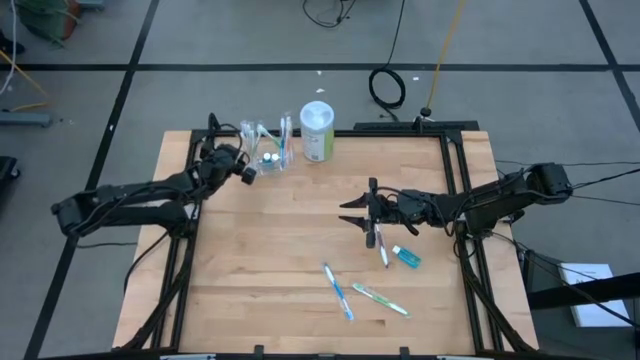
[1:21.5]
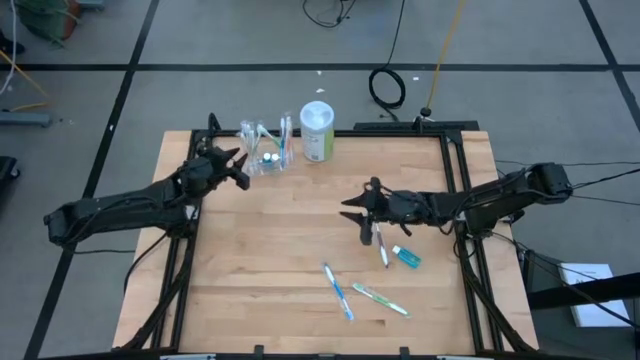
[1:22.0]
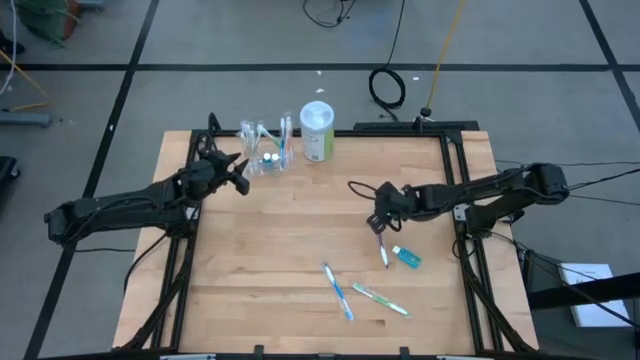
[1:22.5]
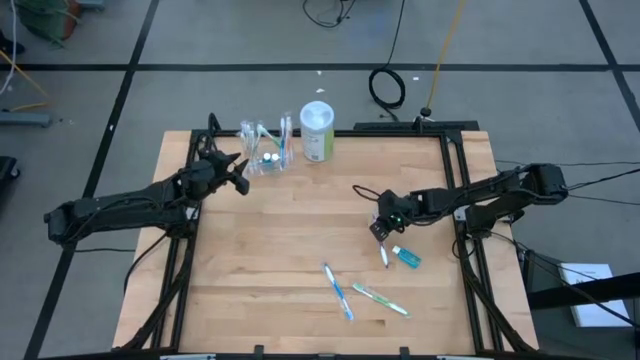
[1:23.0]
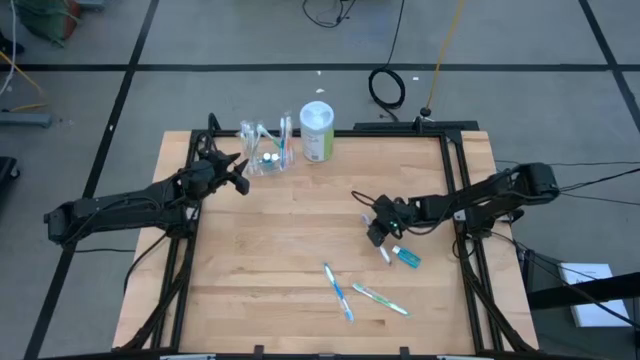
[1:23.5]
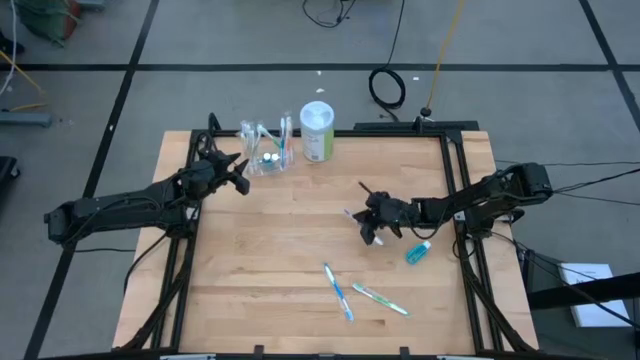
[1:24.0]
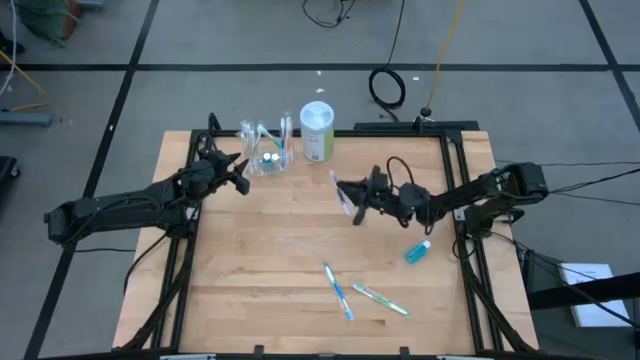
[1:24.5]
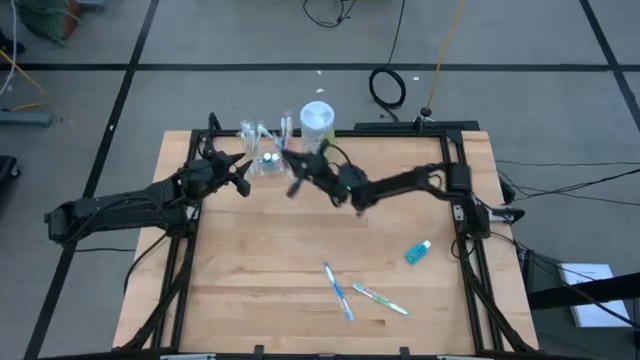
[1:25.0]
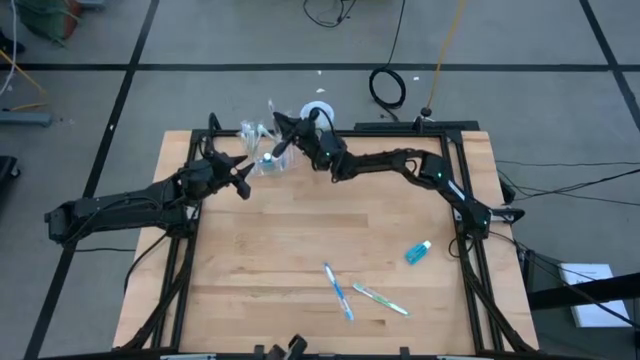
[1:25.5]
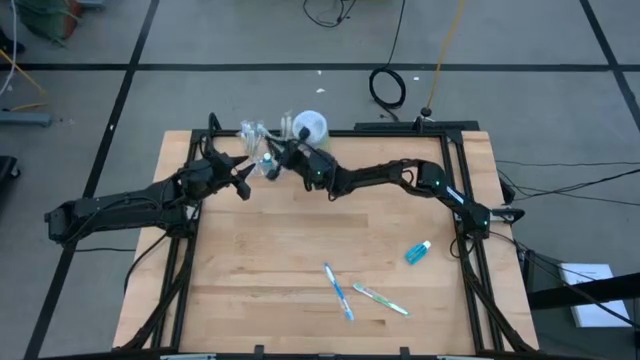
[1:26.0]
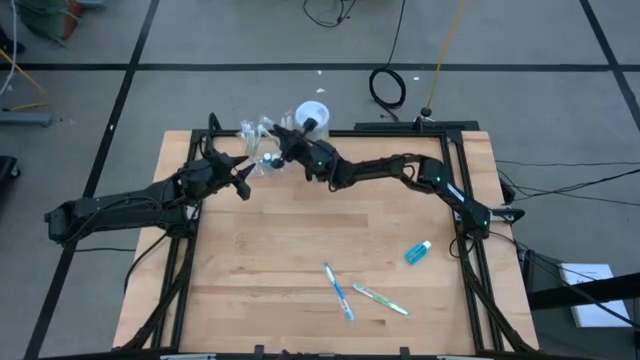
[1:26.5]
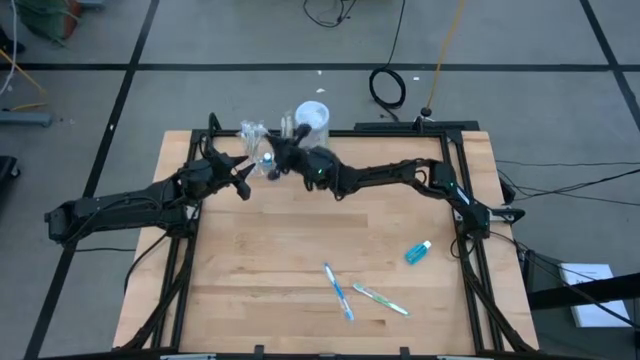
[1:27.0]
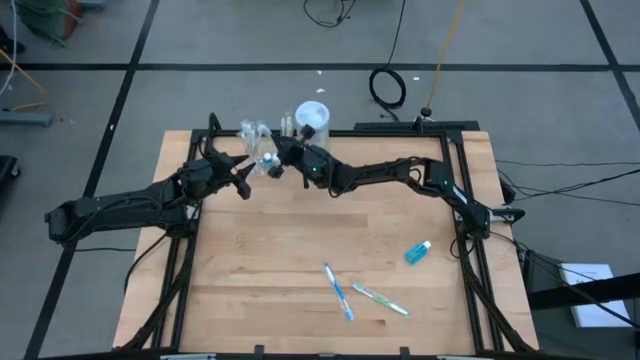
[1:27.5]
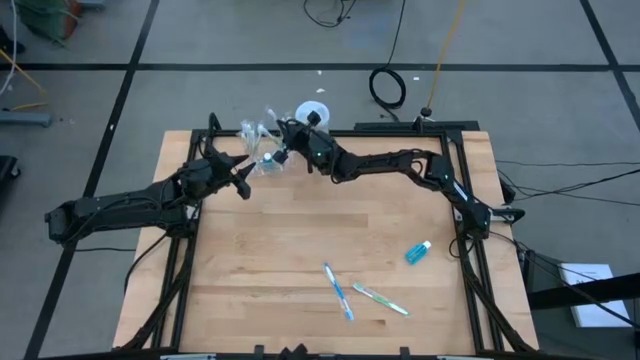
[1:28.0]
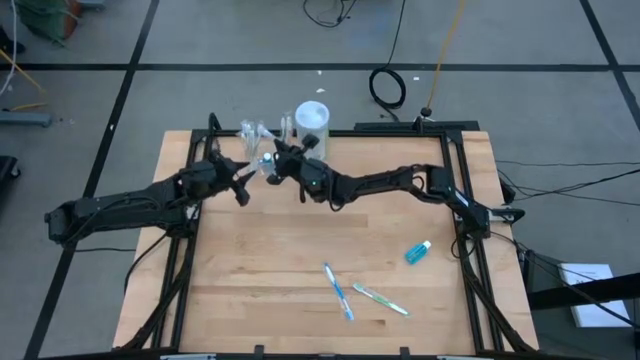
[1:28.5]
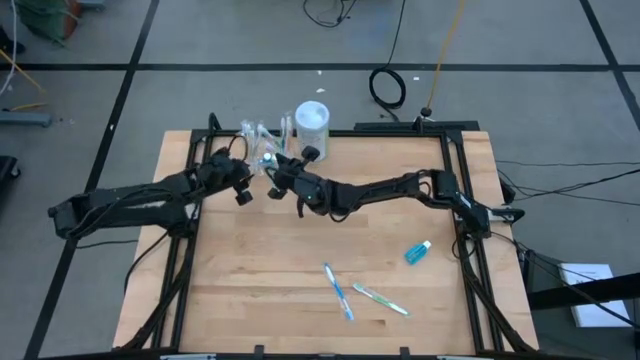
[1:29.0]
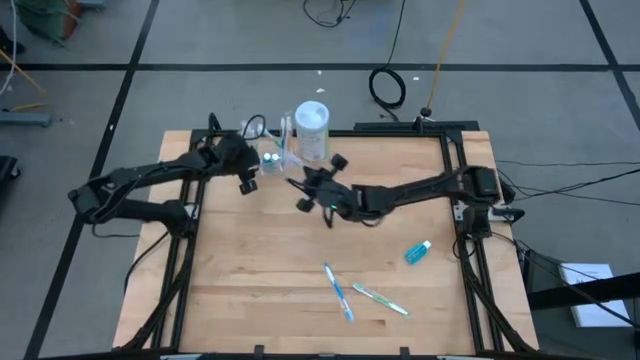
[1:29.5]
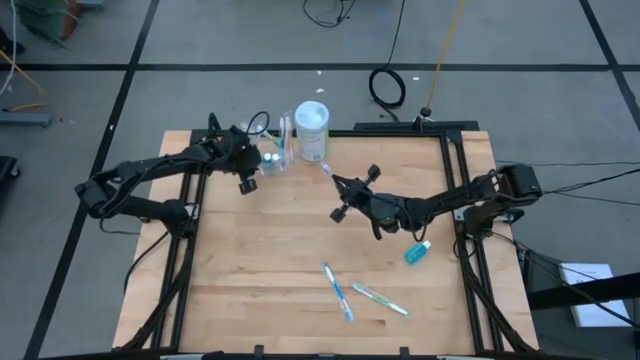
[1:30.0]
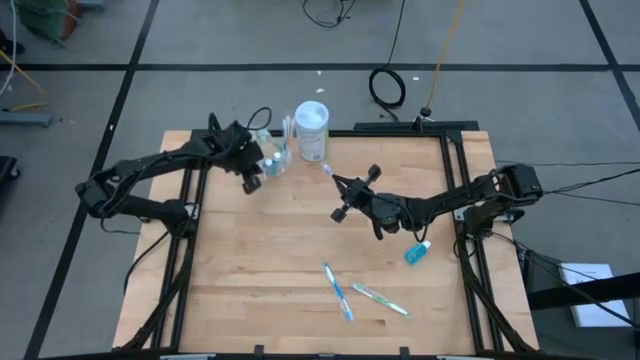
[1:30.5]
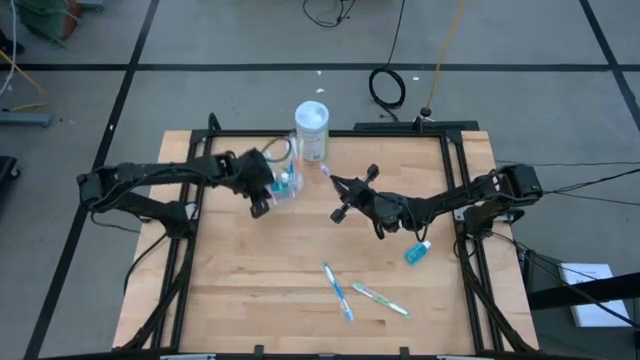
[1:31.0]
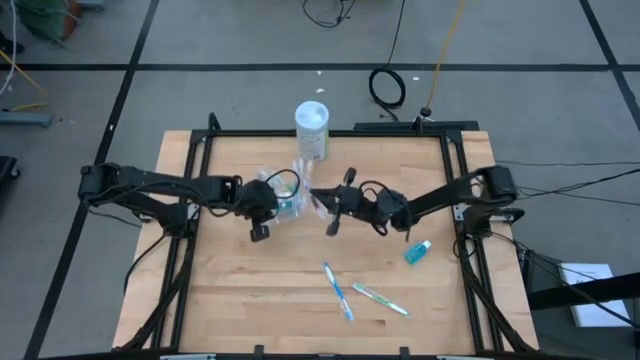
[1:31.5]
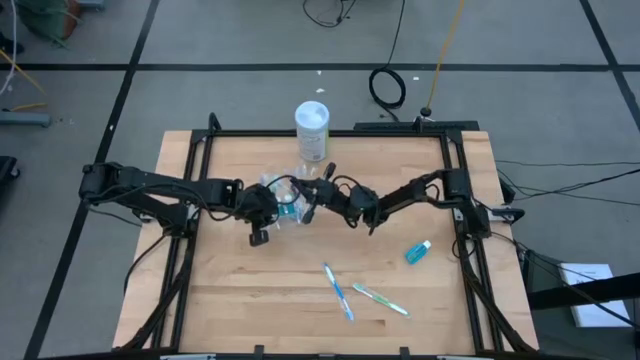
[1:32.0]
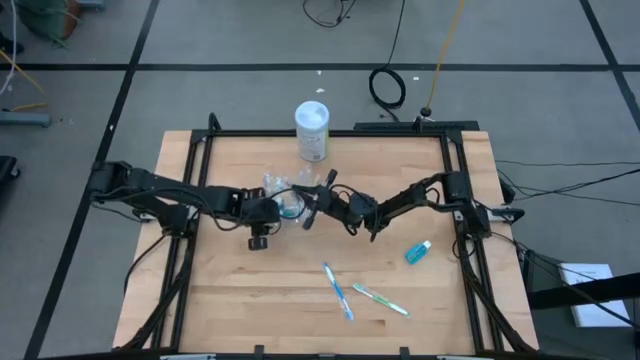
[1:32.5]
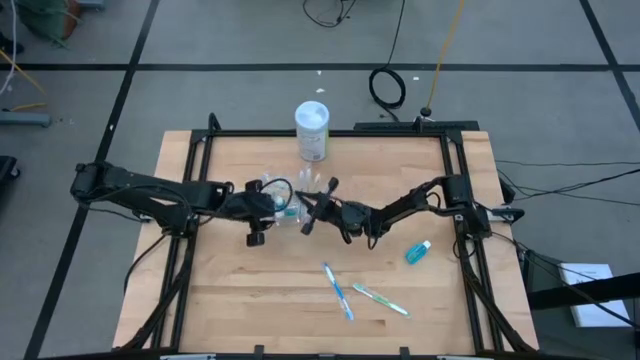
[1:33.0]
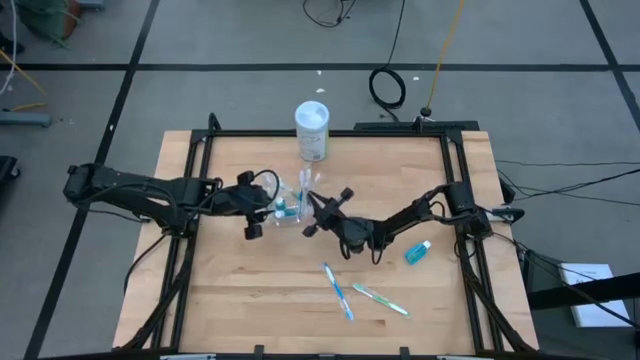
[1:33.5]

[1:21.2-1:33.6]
Task: Pick & Place toothbrushing station
Put the violet toothbrush into the transparent organizer

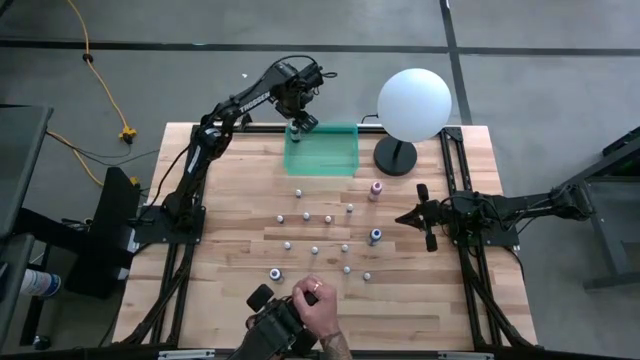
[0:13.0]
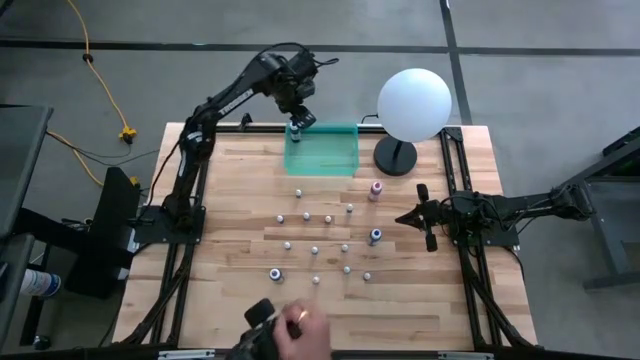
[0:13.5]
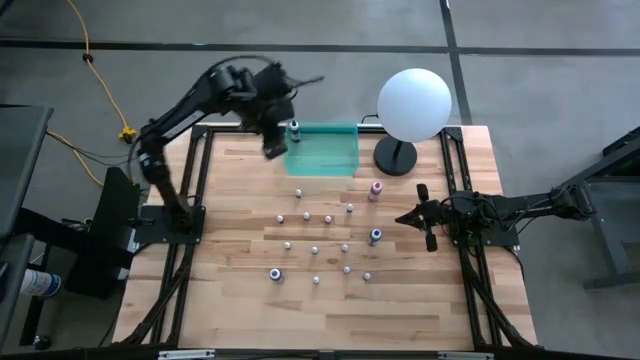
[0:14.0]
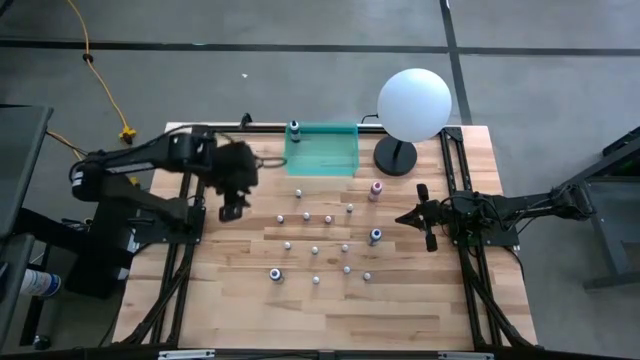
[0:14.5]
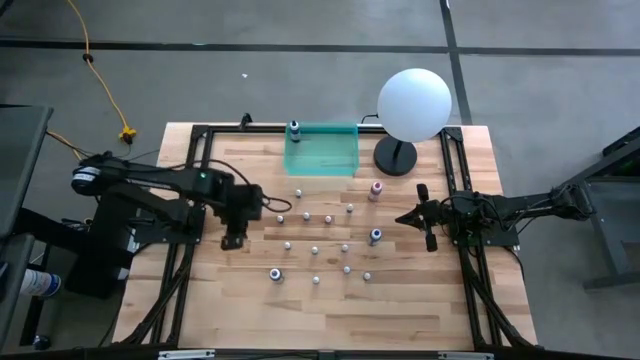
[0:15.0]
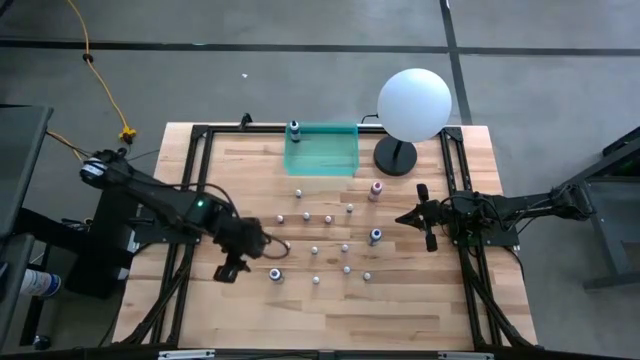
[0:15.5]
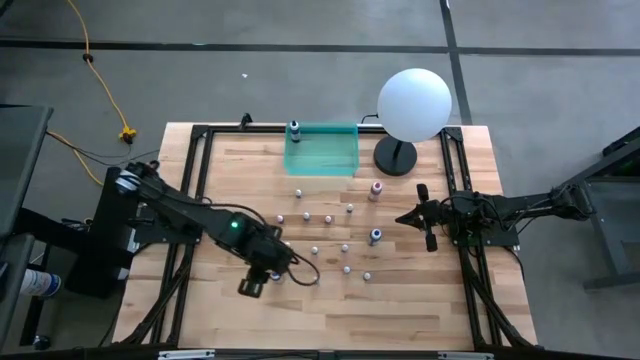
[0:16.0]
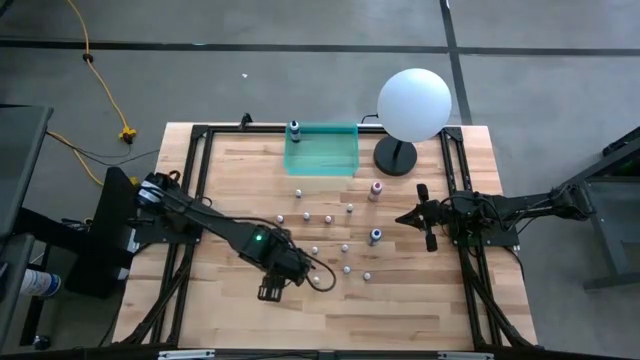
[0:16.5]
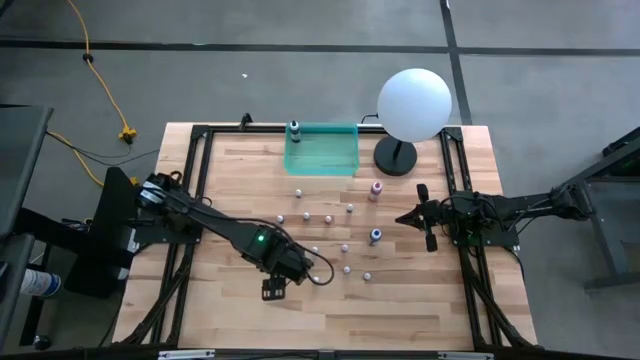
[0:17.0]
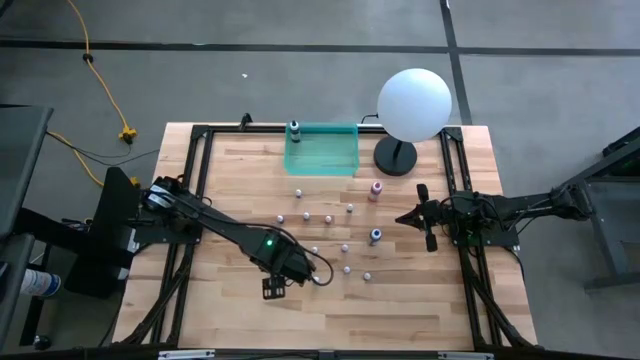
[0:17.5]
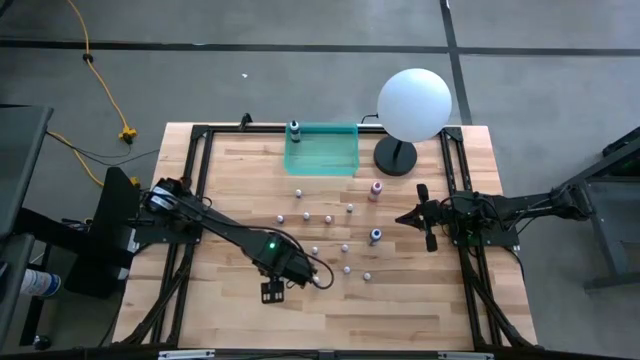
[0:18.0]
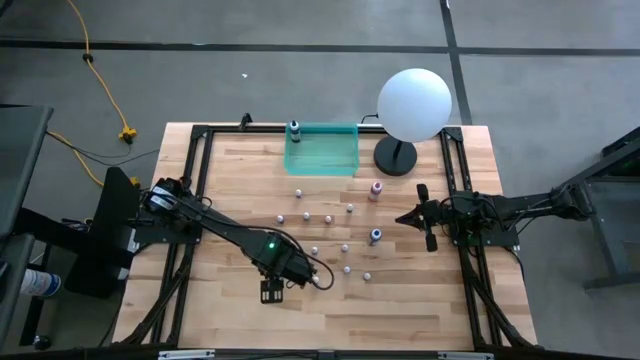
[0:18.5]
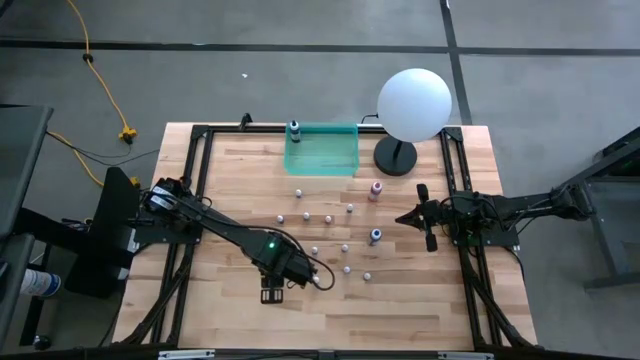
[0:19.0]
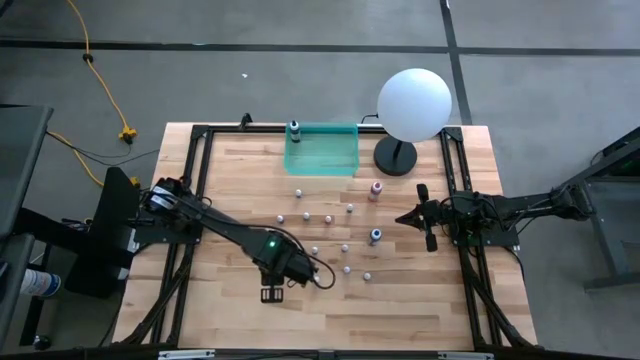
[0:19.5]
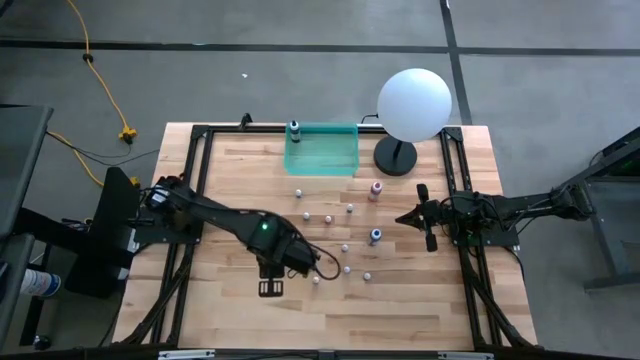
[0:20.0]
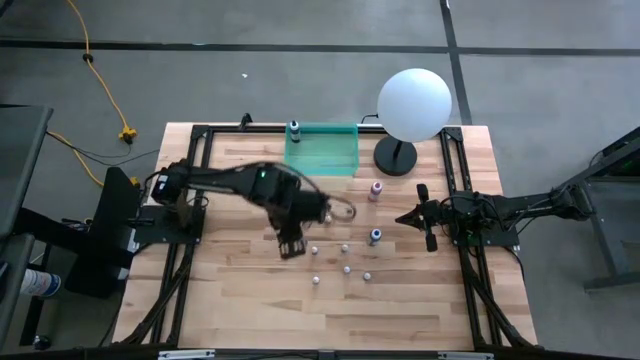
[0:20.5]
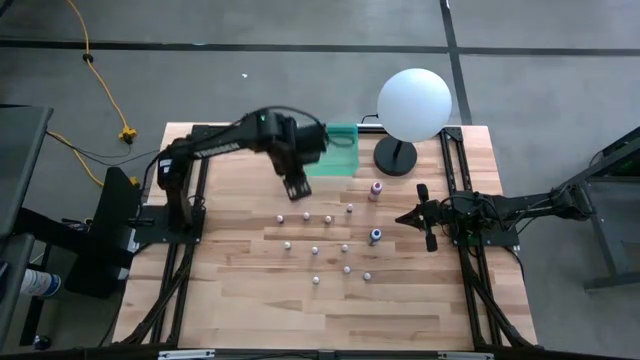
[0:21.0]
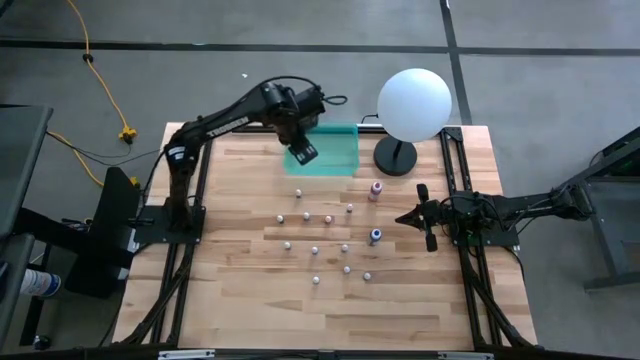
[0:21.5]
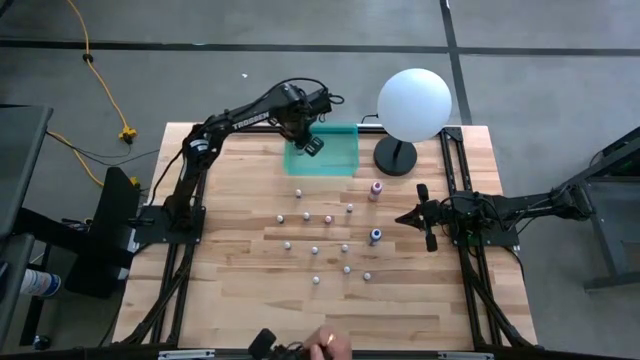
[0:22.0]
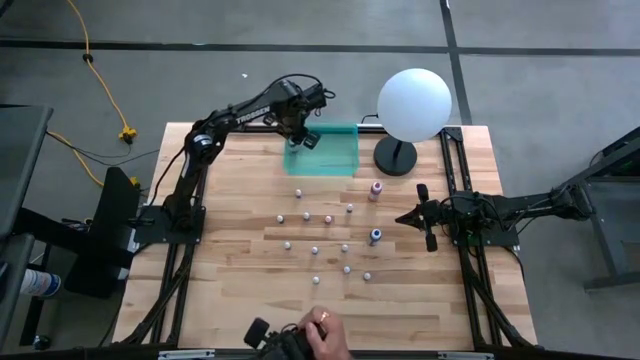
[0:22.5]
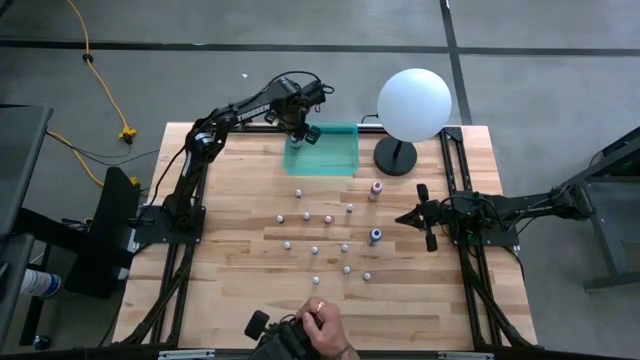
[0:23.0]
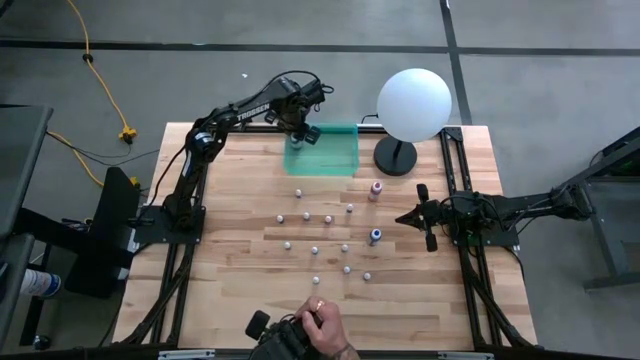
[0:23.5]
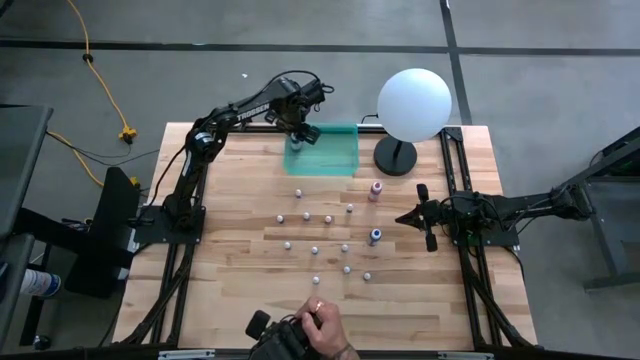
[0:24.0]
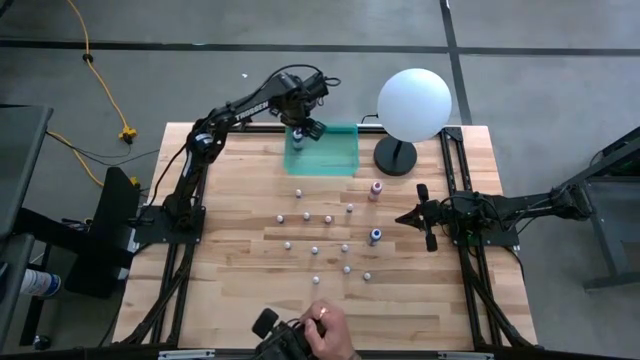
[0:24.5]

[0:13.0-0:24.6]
Task: Pick & Place food coloring
Put the big purple food coloring bottle into the bin
